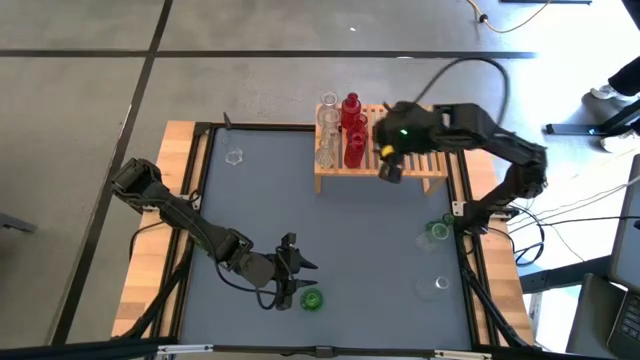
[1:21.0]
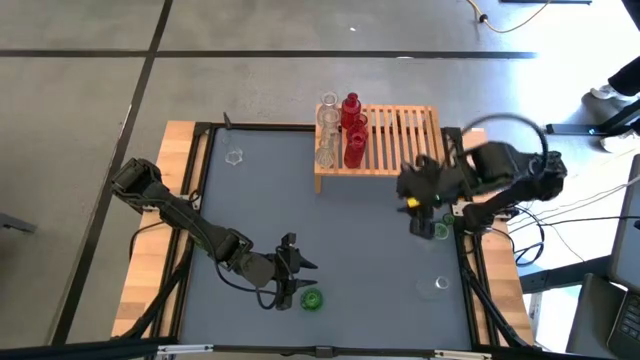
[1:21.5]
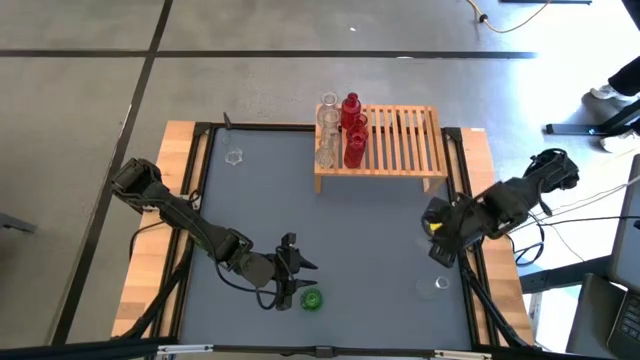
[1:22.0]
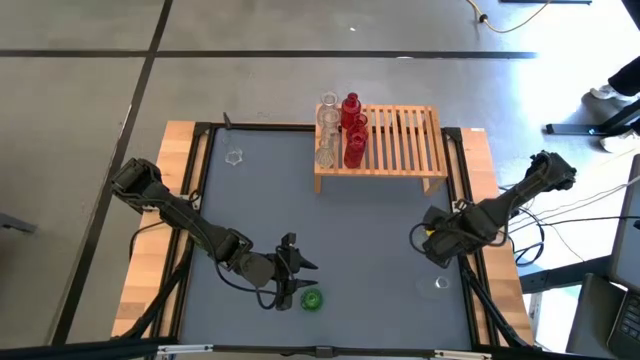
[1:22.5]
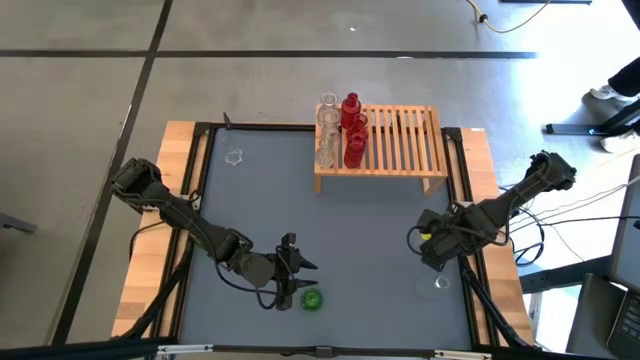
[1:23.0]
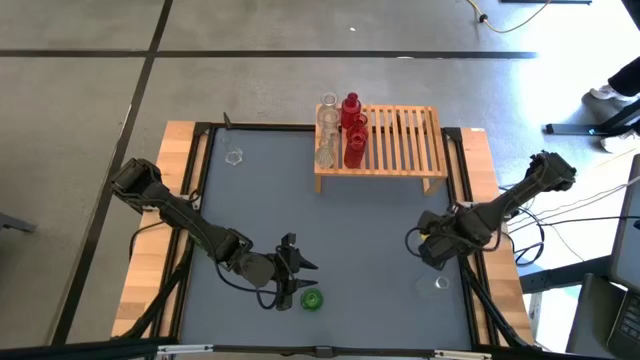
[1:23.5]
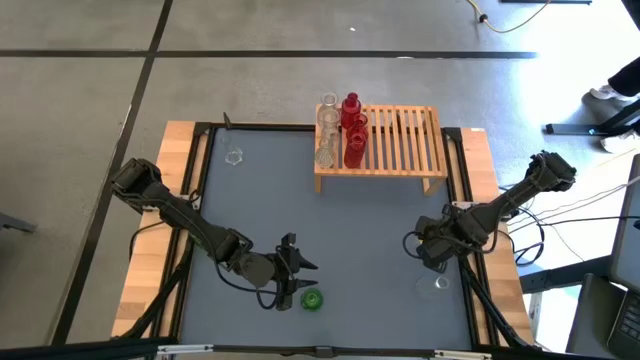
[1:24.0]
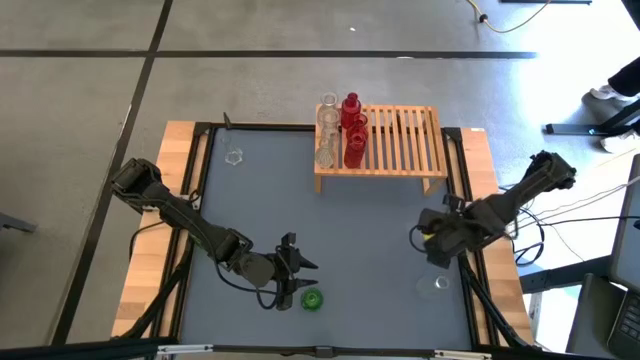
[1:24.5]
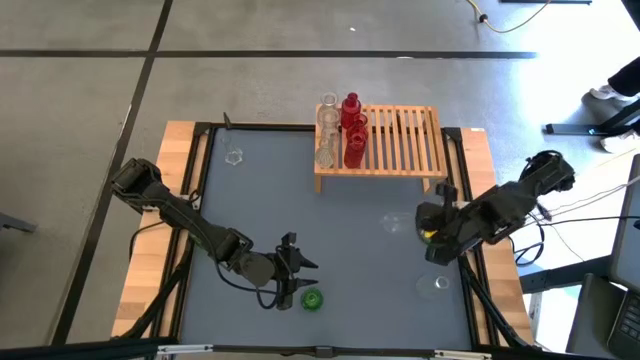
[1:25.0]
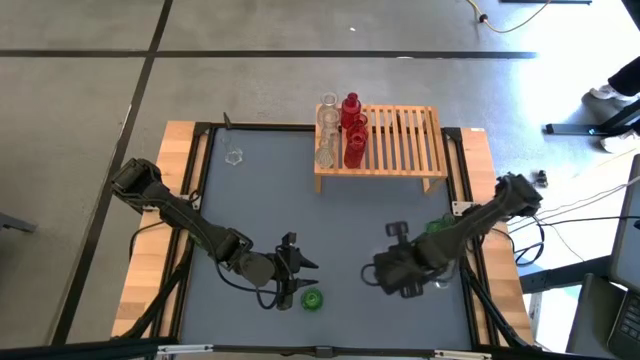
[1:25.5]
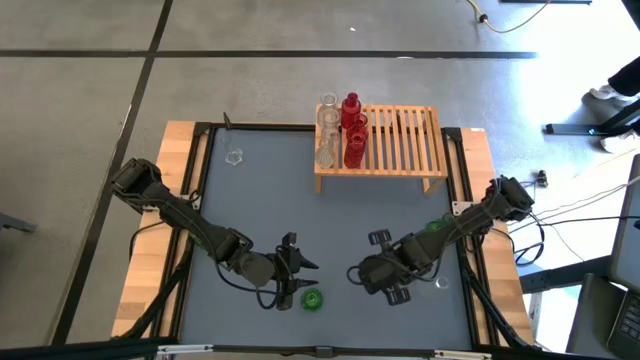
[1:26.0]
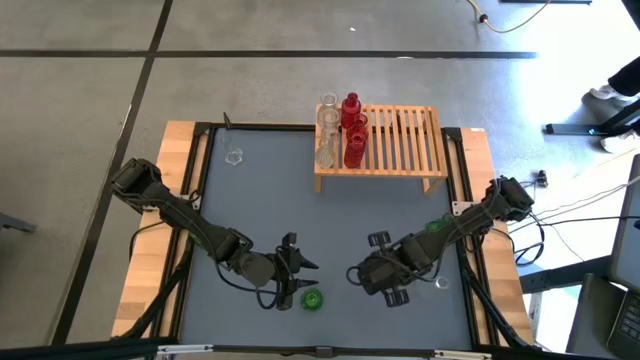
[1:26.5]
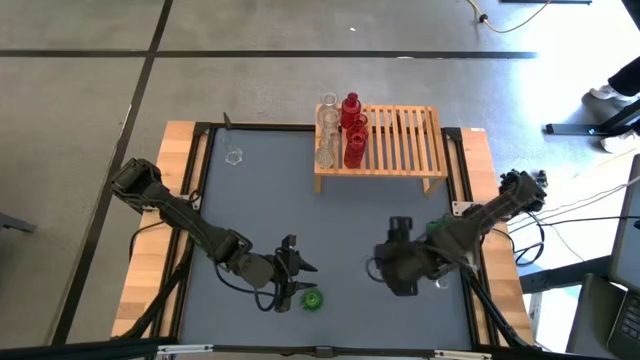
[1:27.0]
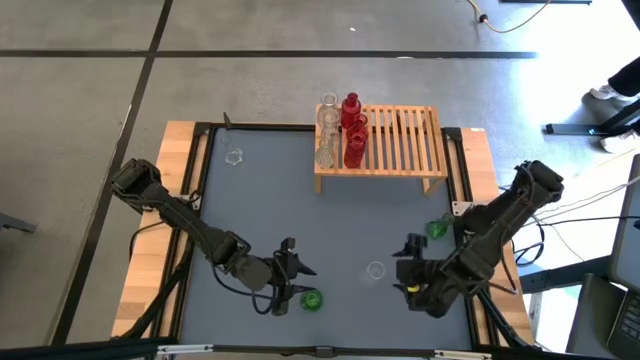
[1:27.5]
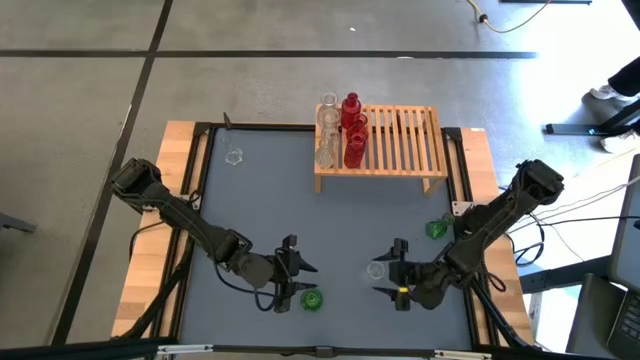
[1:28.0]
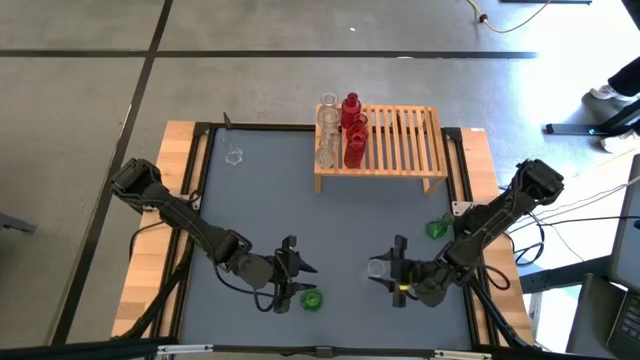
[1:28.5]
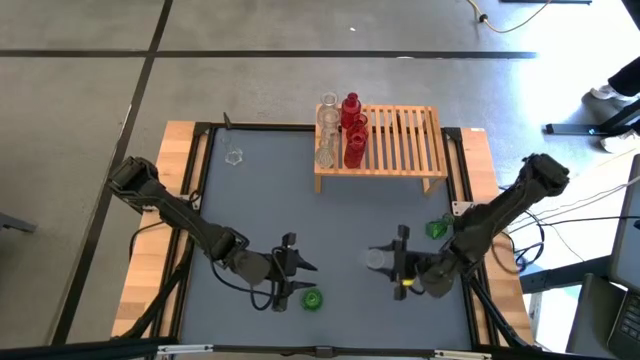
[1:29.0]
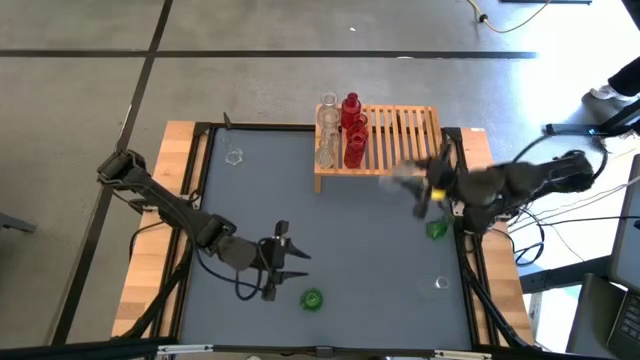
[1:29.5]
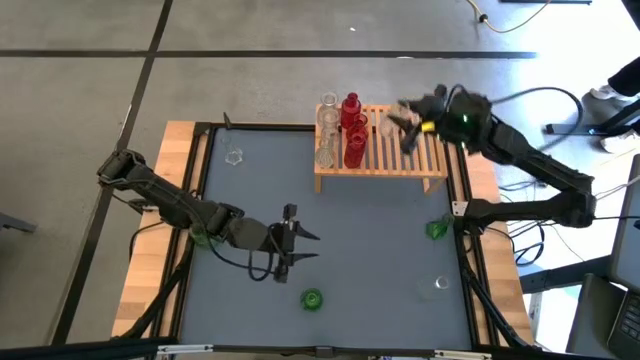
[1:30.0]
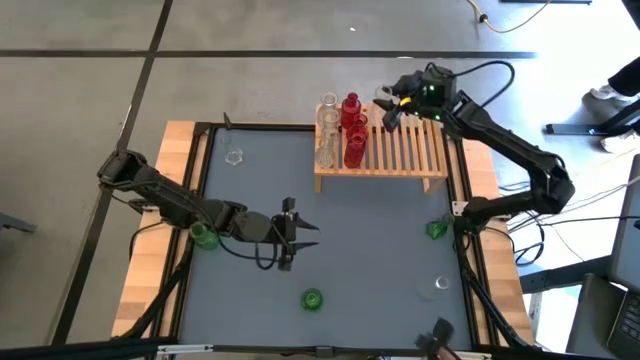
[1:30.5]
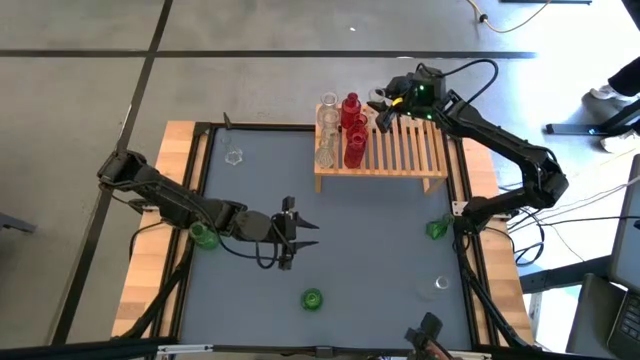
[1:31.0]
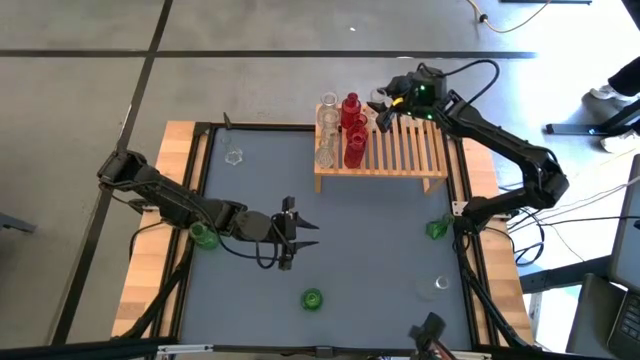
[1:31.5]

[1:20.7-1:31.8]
Task: sort vases onto shelf
Put the top right transparent vase onto the shelf

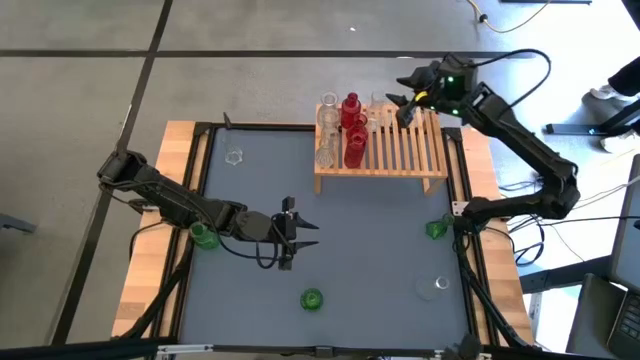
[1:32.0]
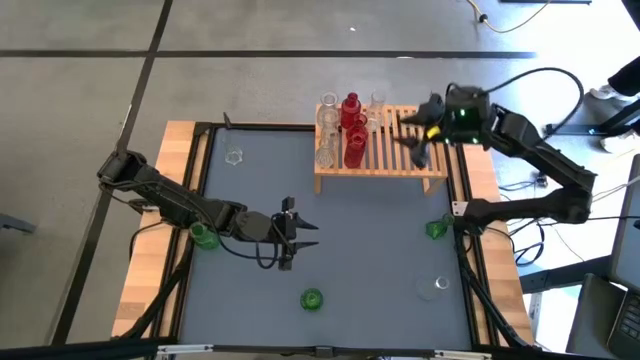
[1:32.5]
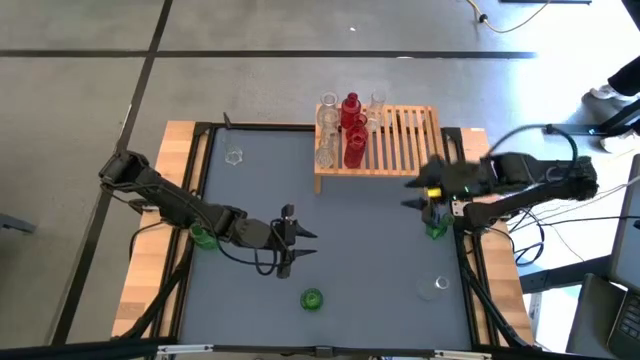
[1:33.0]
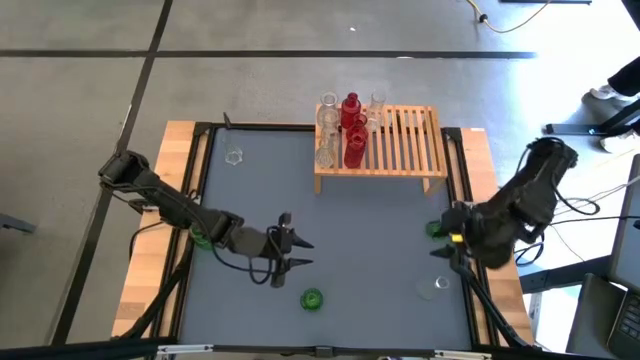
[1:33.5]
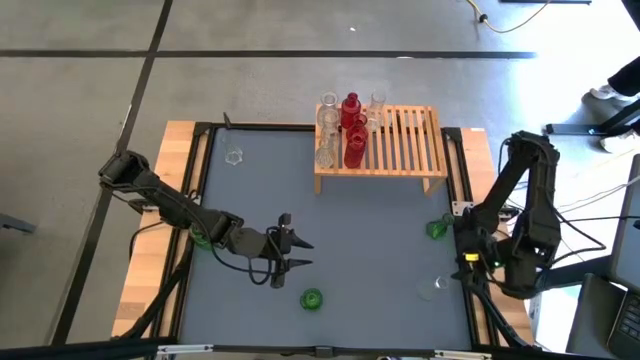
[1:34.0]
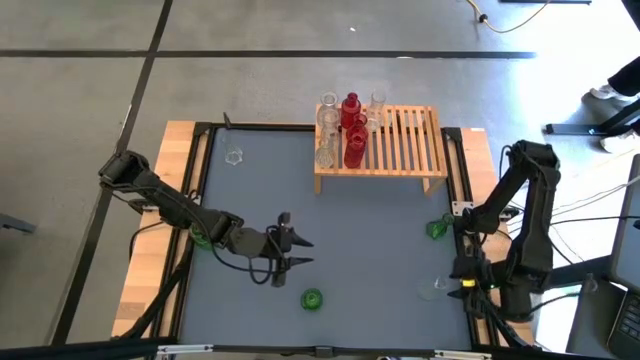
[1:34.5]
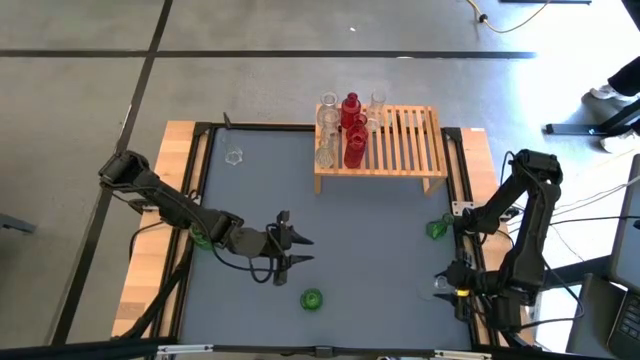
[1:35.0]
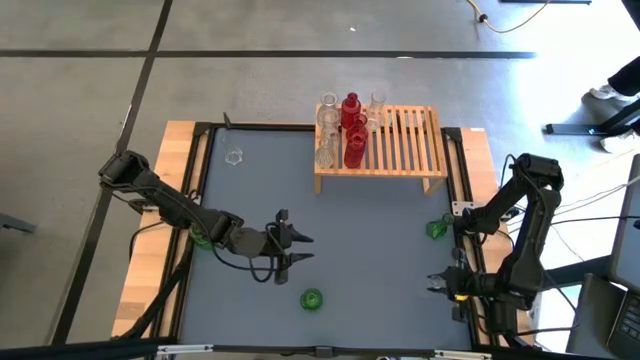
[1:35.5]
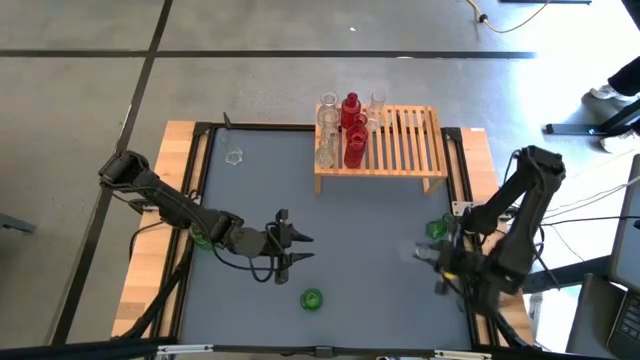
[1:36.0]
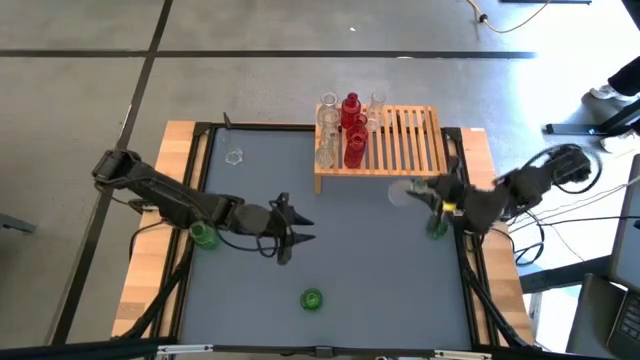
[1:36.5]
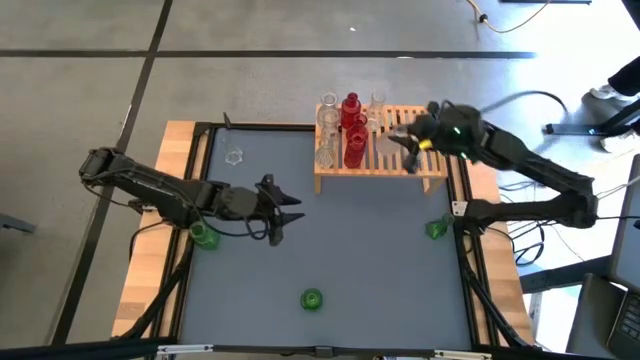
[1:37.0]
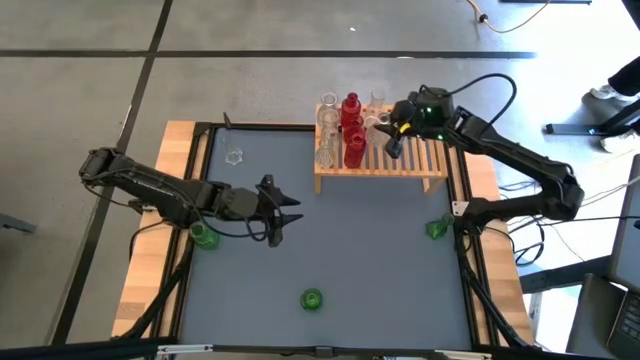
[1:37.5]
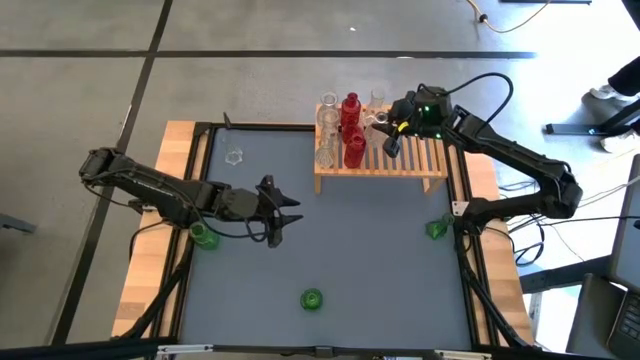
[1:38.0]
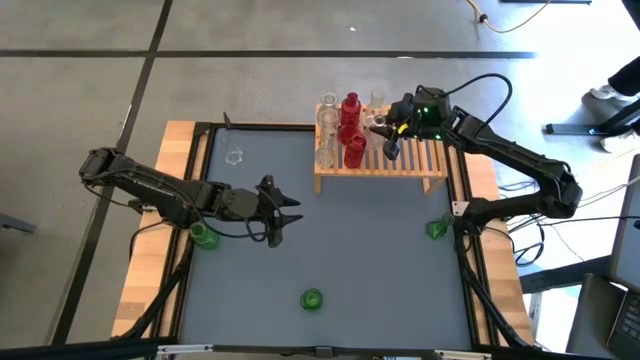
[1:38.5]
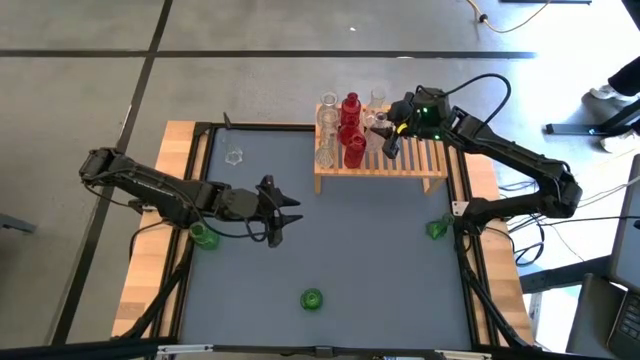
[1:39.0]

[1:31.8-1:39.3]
Put the bottom right transparent vase onto the shelf aligned with the other transparent vase

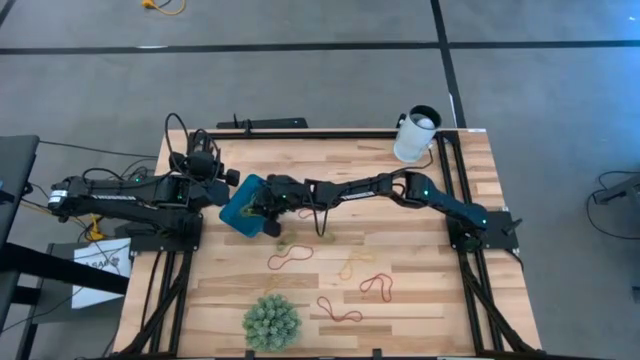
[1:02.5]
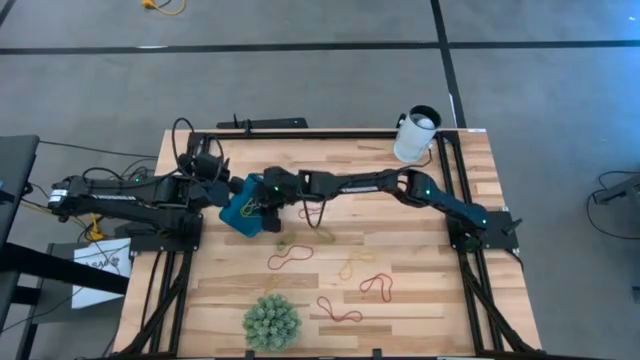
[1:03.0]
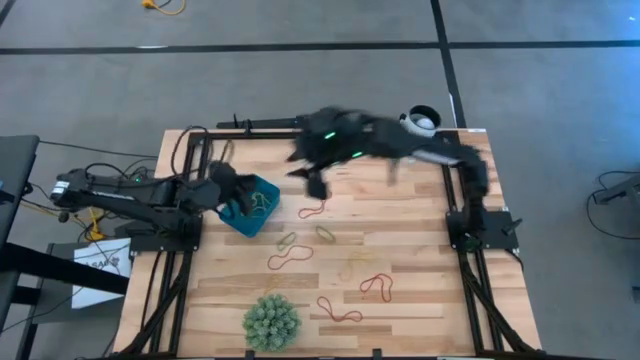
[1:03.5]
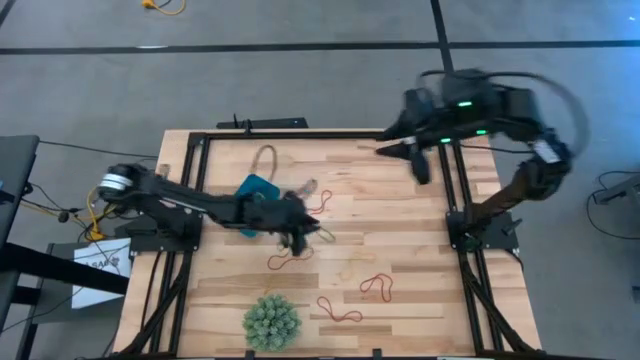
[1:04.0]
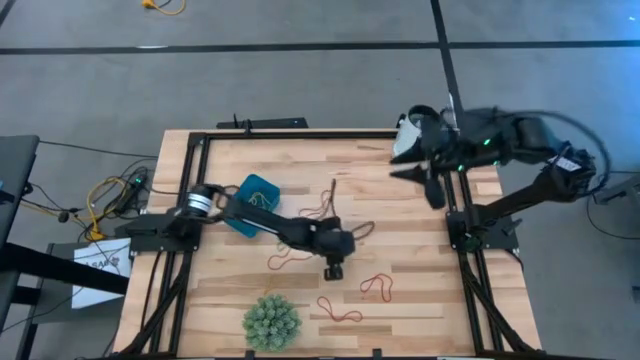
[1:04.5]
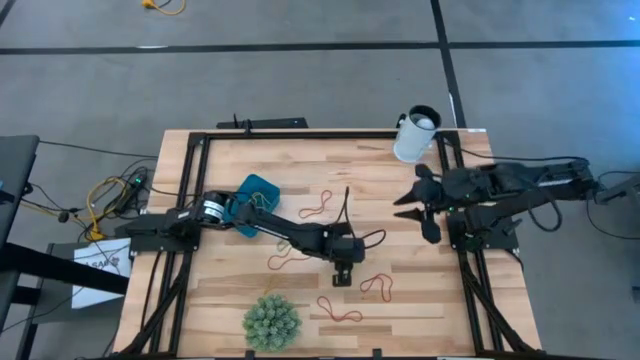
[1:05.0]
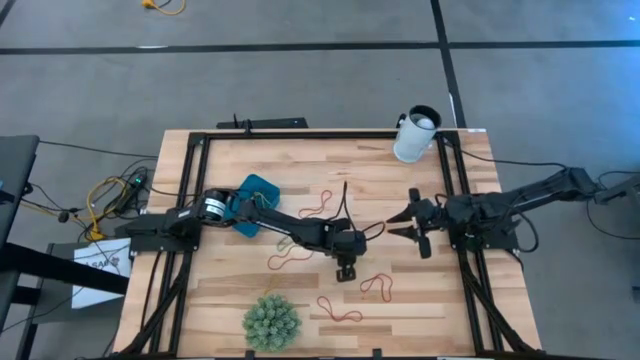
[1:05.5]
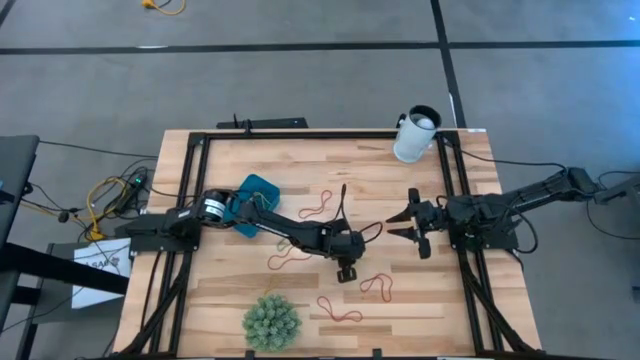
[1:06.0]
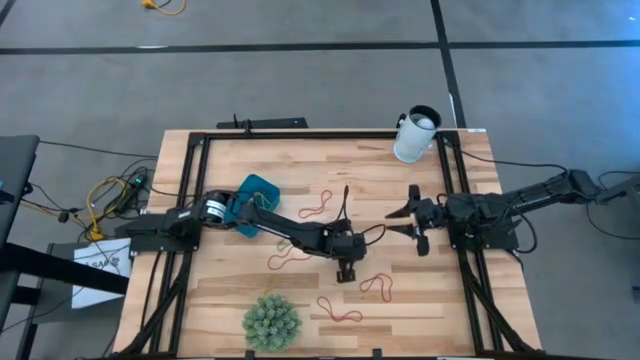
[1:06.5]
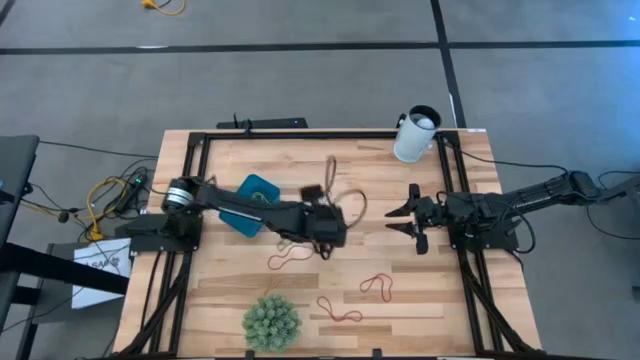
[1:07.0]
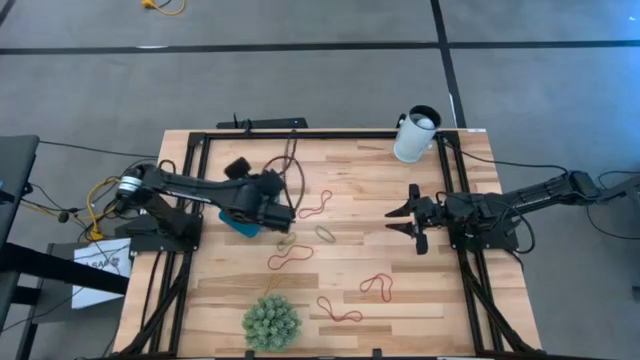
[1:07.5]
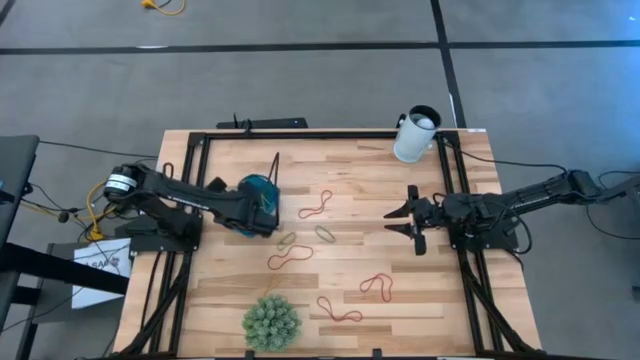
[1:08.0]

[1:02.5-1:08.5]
Task: Pick and place items into bin
Put the yellow rubber band into the blue bin
